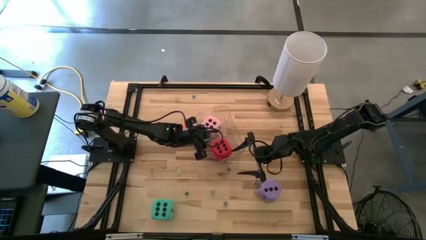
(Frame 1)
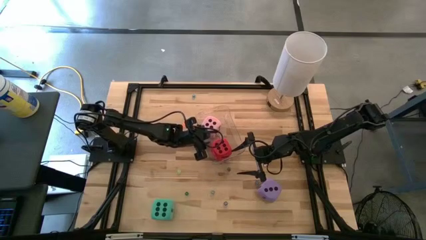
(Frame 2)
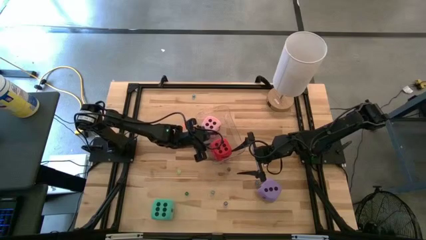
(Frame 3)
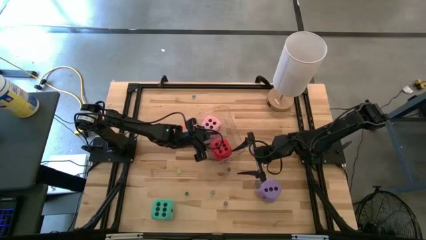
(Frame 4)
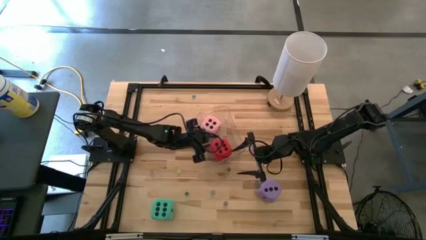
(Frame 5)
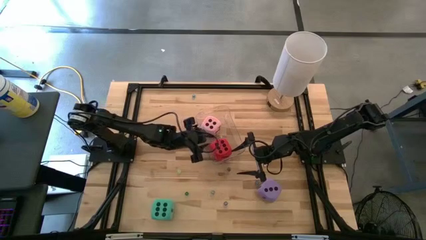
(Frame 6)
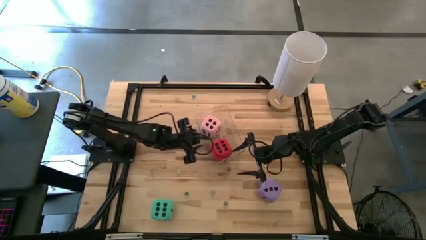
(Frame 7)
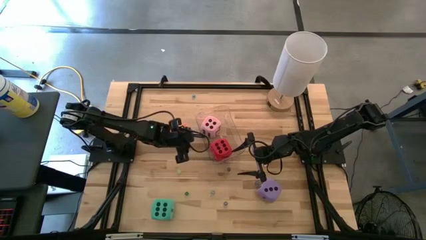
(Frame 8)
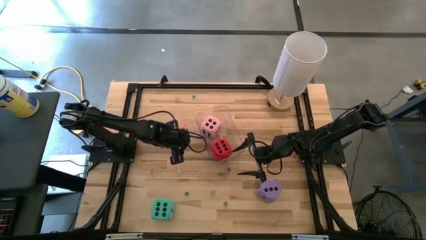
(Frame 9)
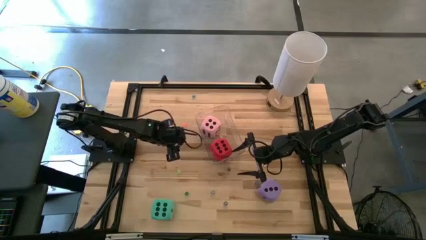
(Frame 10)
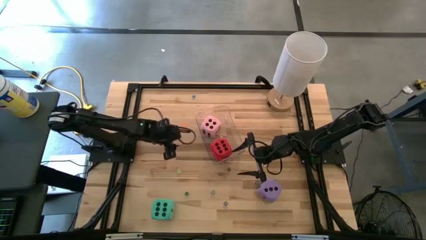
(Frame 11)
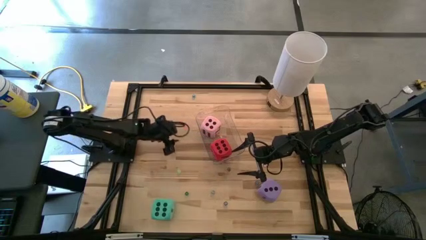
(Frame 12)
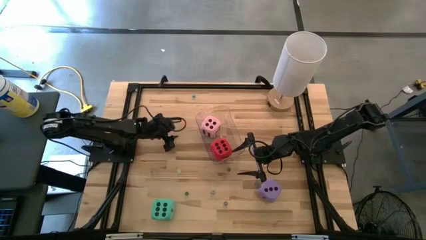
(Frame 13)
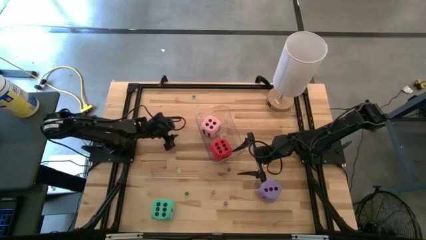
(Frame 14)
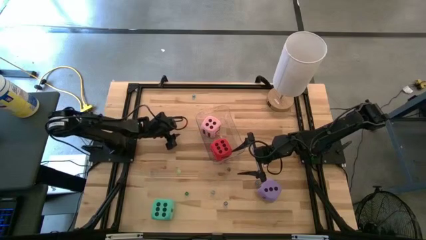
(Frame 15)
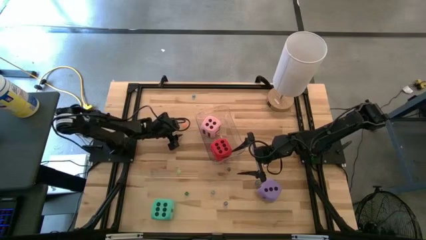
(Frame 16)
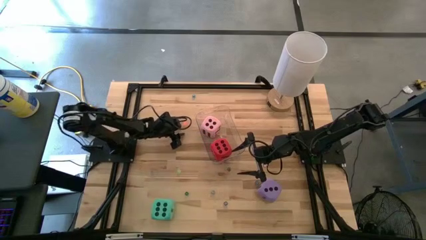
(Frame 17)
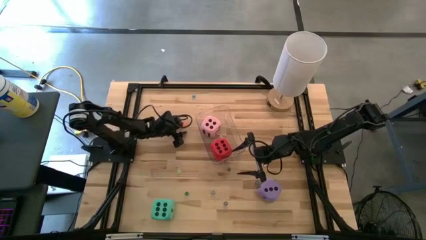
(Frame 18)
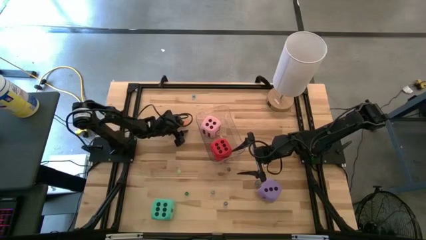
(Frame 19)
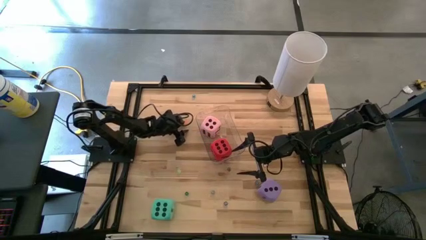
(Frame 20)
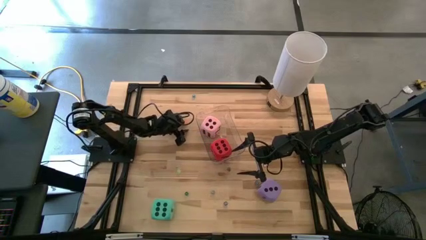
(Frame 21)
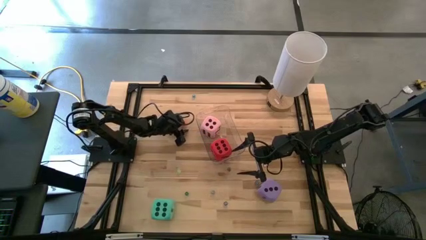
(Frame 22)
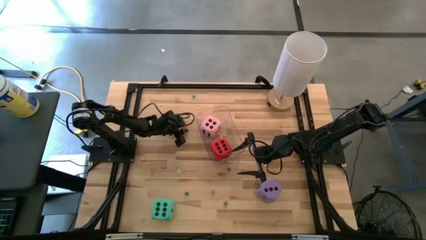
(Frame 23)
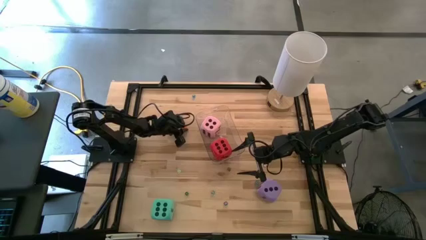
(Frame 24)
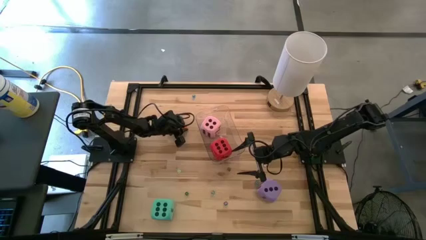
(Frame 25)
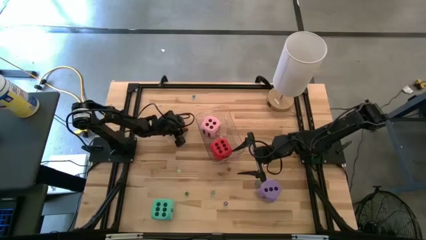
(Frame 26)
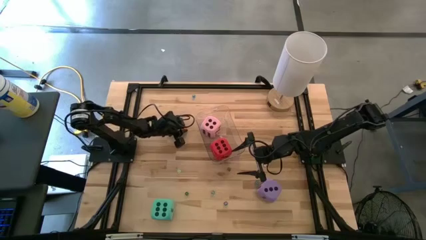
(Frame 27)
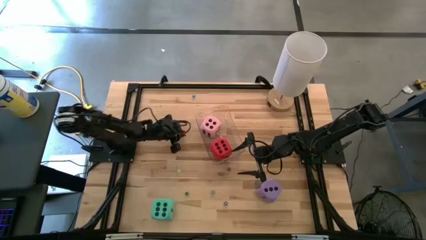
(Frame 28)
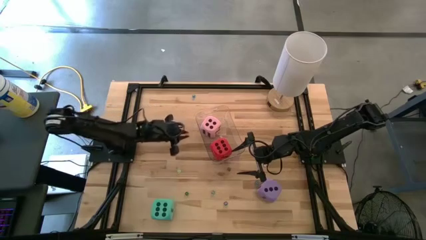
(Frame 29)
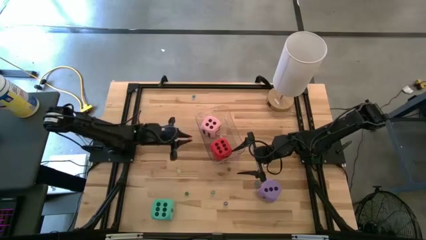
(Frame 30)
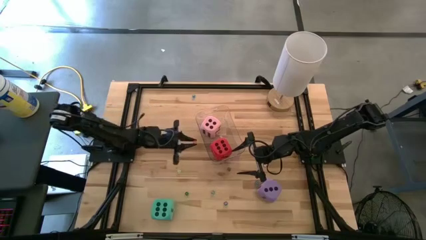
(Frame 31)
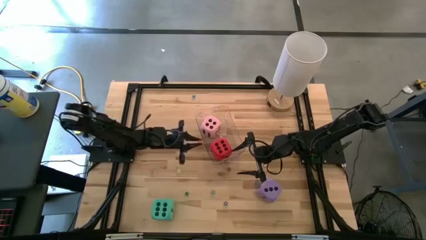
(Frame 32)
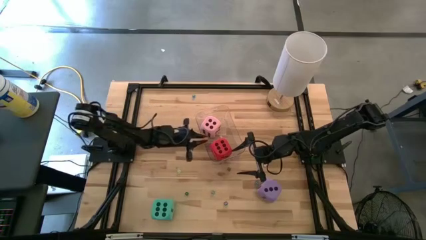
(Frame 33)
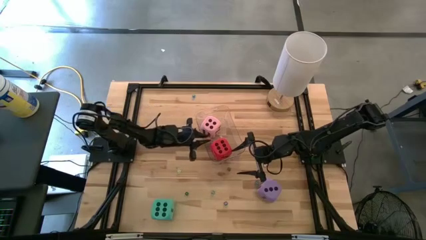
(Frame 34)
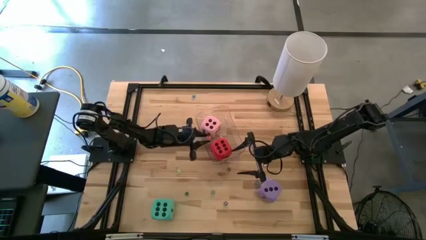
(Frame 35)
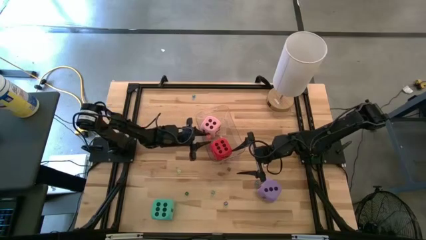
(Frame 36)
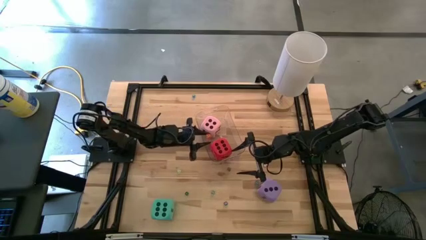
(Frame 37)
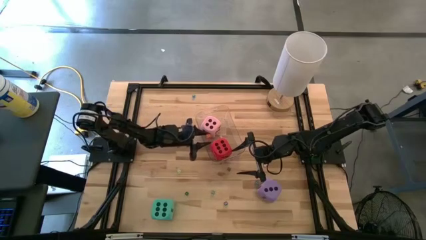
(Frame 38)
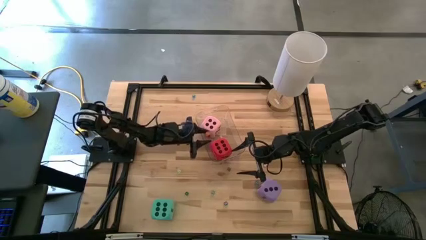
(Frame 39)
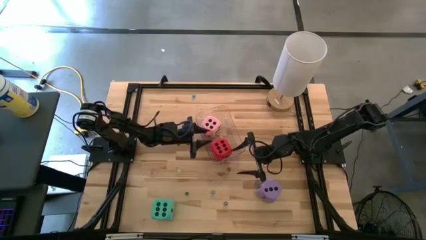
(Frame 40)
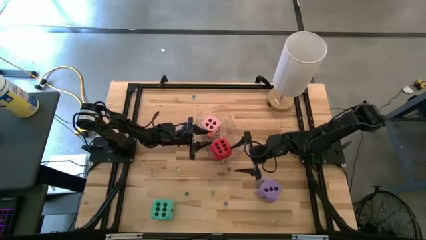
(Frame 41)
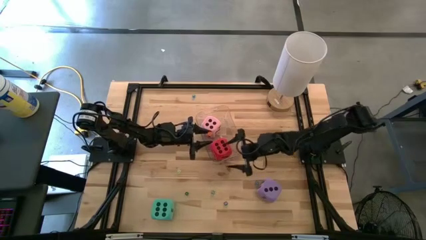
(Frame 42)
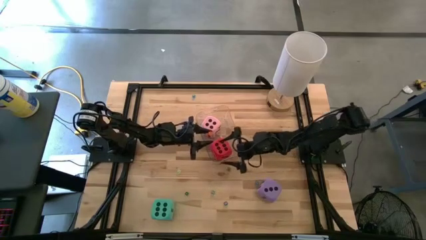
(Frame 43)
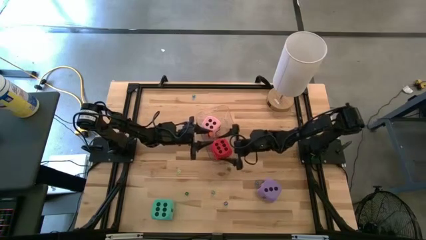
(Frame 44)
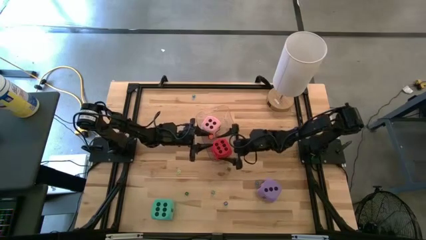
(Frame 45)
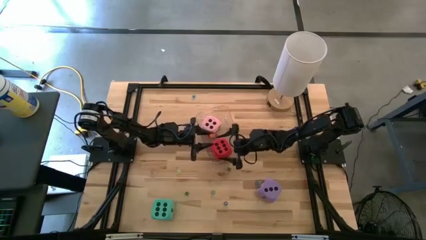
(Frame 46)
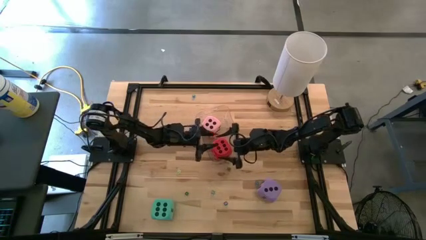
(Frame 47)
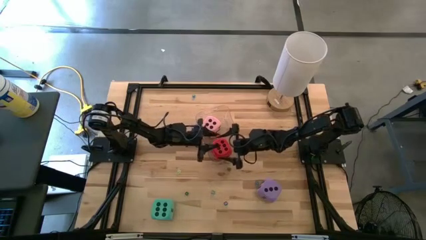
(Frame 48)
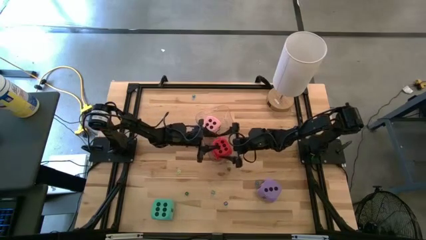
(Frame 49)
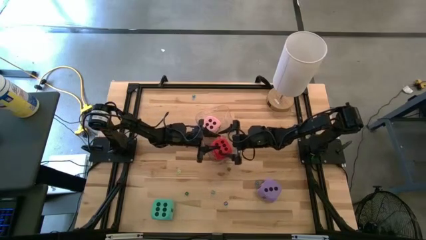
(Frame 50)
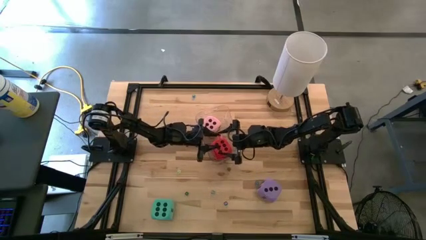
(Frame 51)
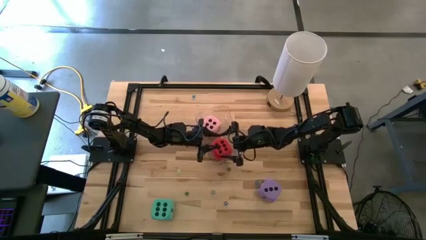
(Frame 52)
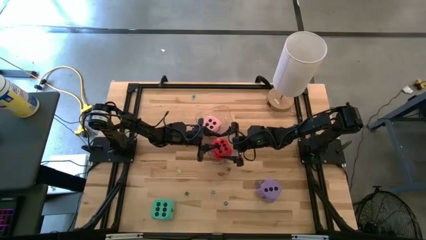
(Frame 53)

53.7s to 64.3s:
Task: Pick & Place Dice
Put the small orange dice into the transparent bin

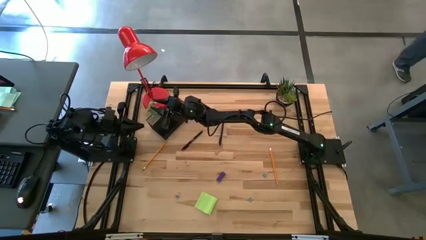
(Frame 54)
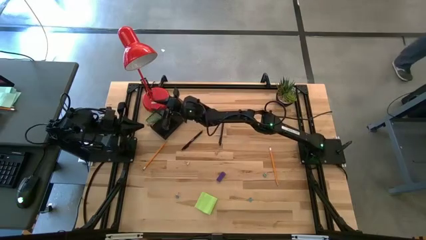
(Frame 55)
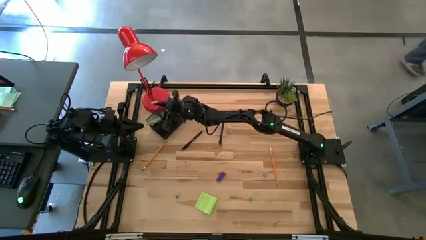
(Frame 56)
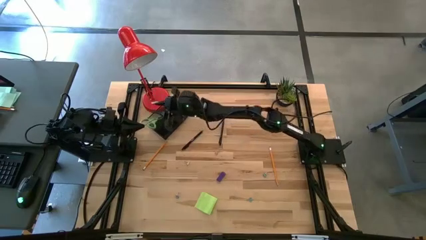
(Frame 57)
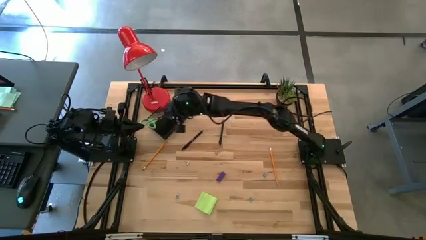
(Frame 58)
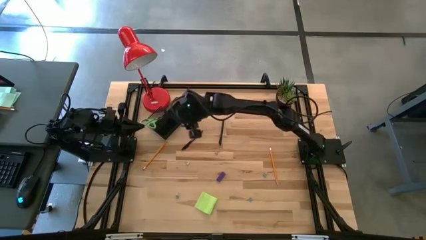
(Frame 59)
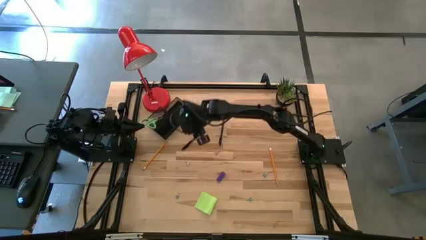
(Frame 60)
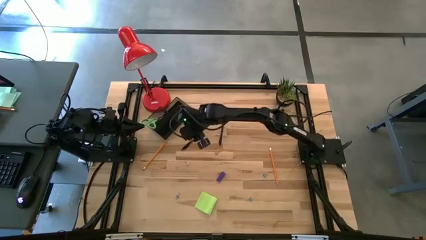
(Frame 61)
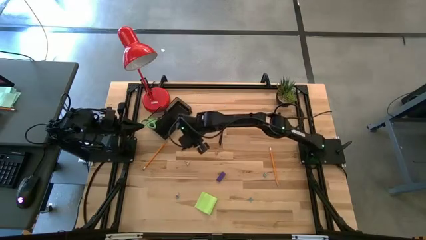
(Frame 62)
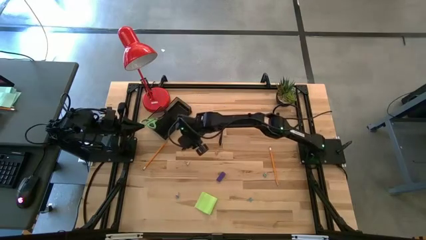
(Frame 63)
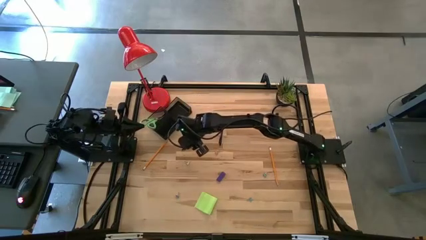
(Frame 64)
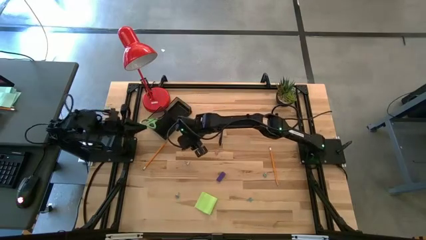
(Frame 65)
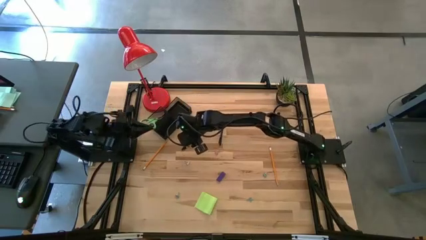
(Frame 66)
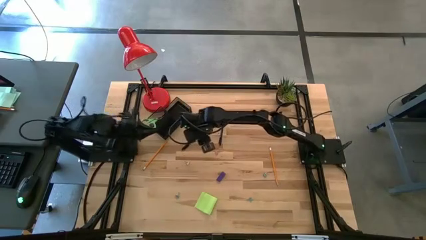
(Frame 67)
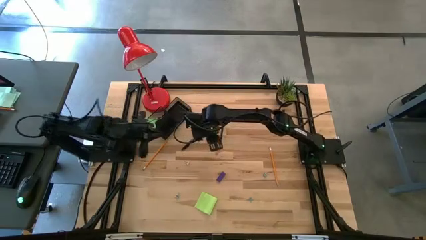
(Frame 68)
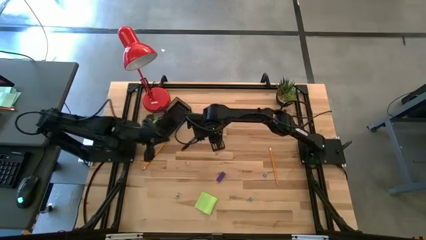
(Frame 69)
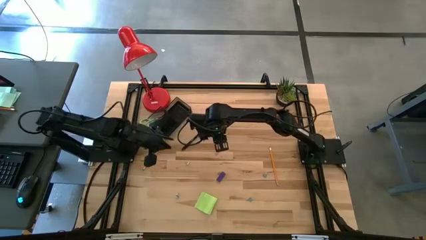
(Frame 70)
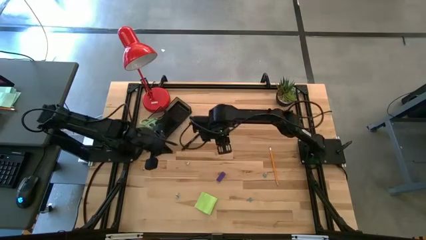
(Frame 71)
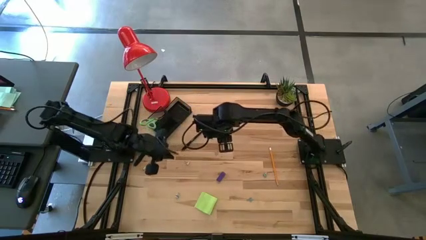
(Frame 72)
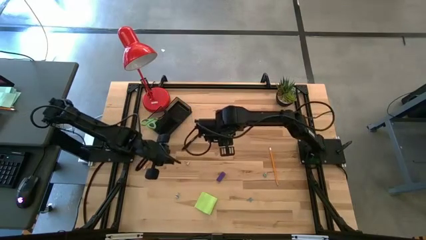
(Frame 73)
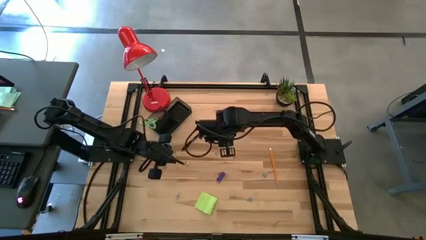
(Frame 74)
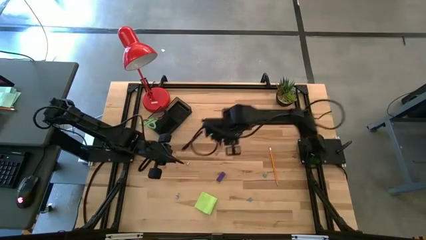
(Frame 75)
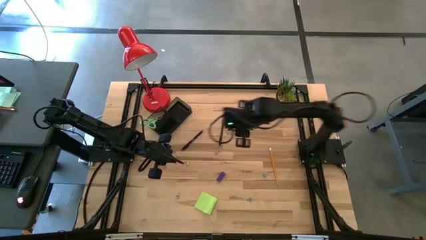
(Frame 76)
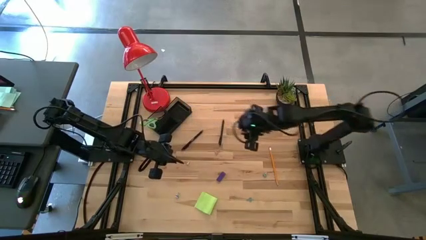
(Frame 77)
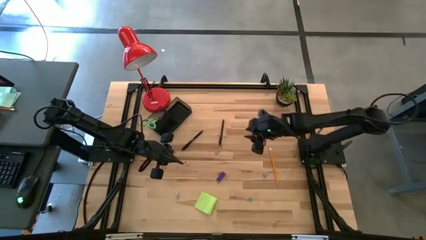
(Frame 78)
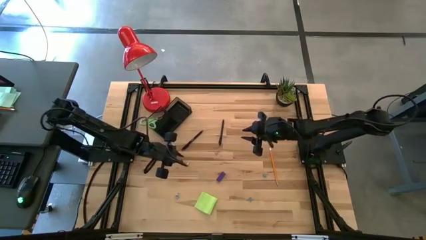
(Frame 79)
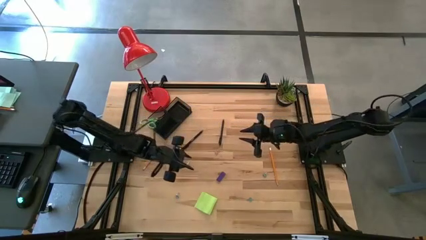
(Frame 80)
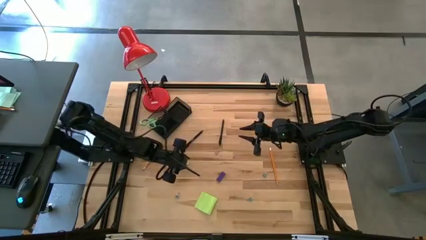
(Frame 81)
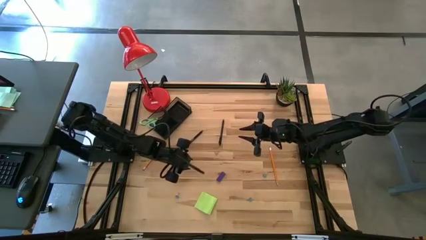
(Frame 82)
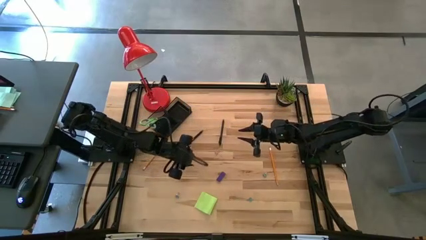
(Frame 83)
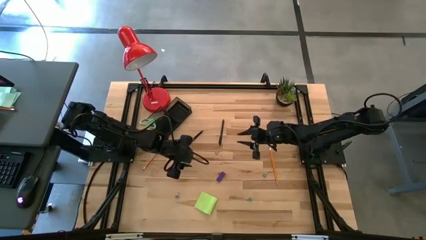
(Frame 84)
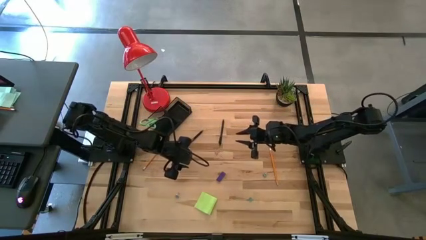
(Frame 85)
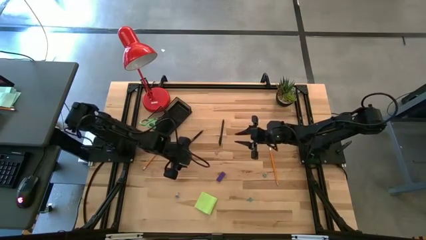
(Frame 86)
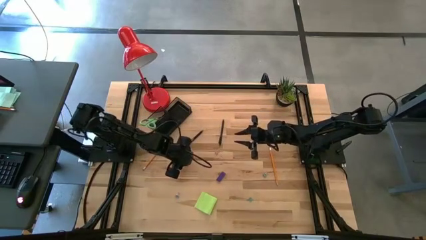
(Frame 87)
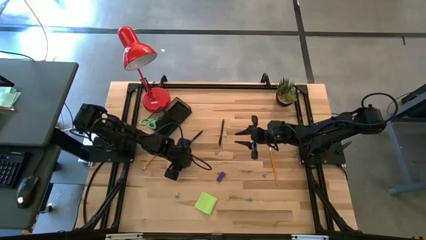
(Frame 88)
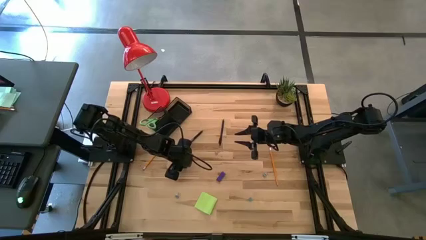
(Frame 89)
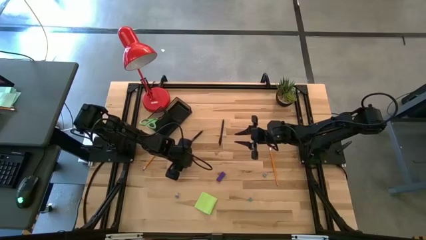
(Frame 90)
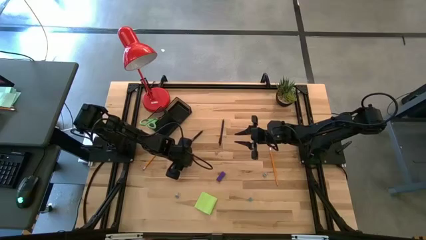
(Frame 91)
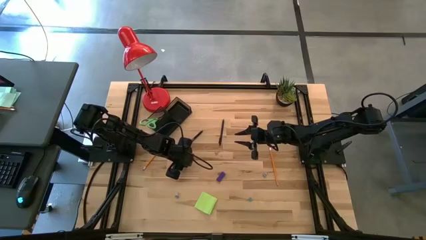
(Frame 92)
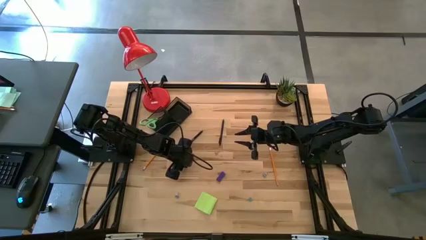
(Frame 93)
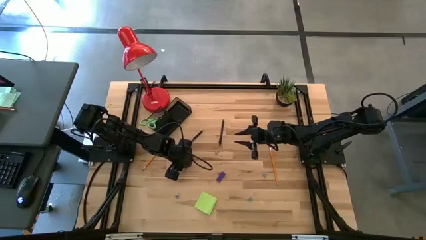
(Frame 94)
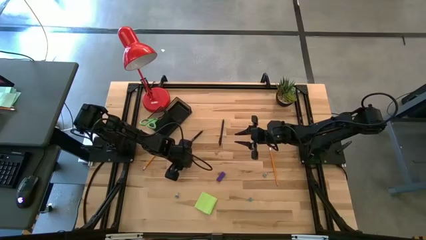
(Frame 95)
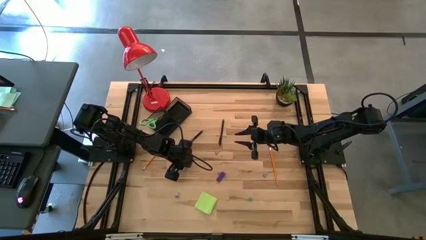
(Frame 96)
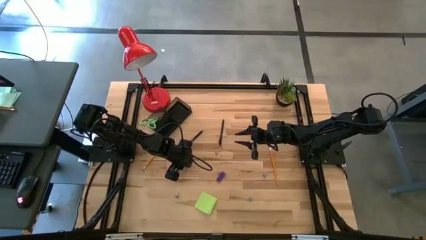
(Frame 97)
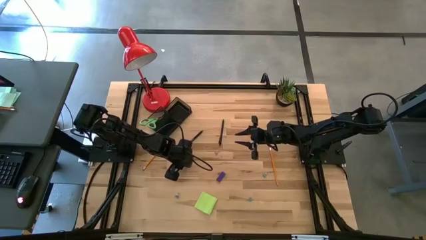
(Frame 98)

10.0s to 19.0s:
Task: Pick and place office supplies into organizer
Put the white binder clip into the desk organizer
